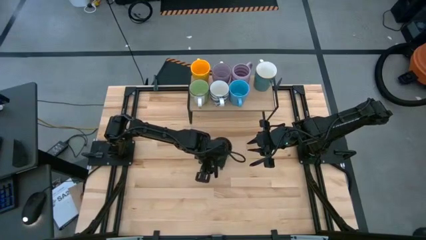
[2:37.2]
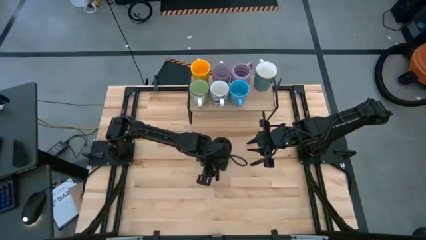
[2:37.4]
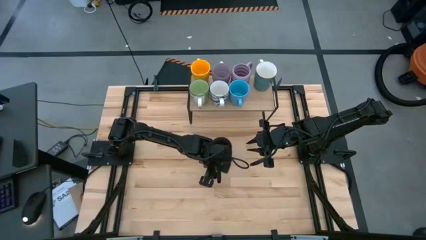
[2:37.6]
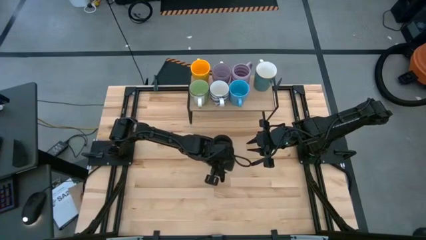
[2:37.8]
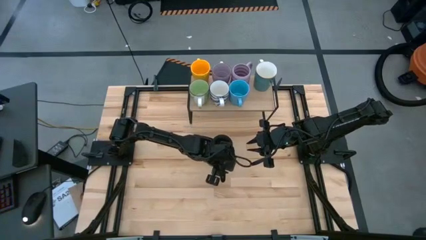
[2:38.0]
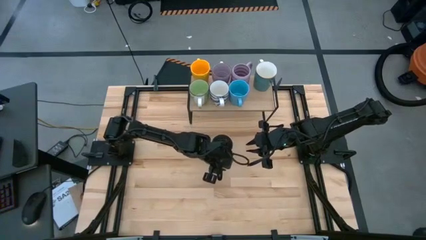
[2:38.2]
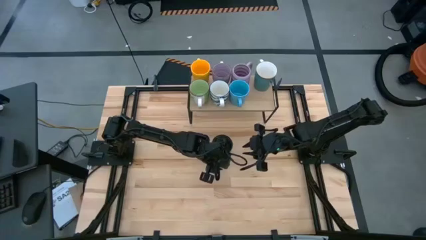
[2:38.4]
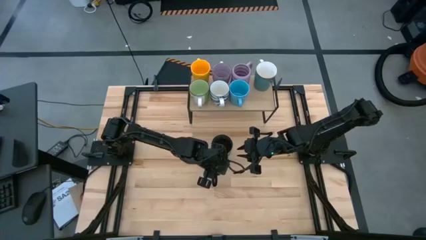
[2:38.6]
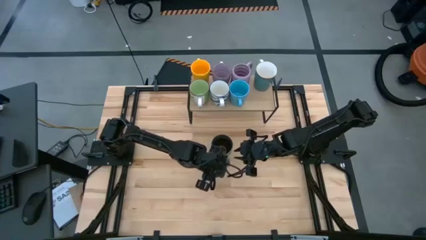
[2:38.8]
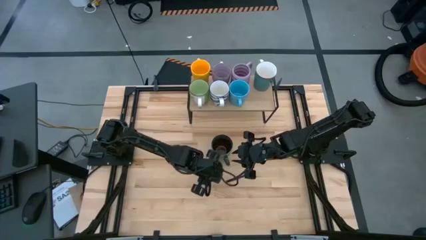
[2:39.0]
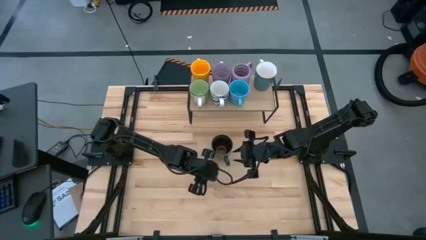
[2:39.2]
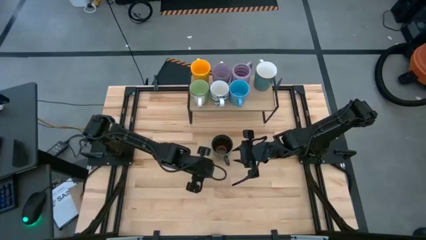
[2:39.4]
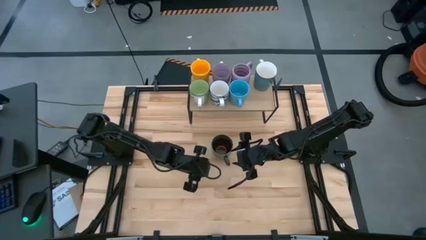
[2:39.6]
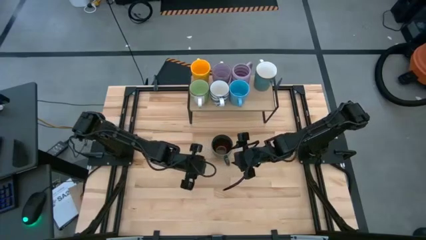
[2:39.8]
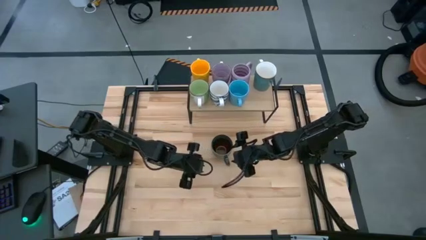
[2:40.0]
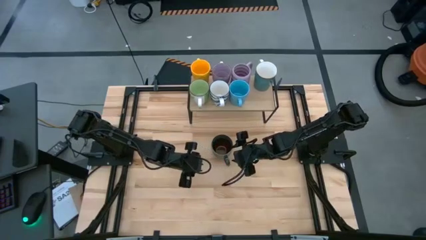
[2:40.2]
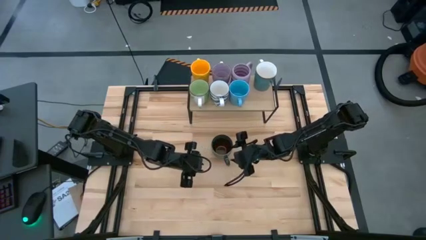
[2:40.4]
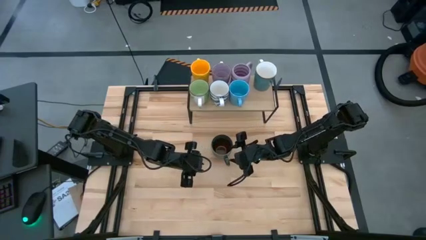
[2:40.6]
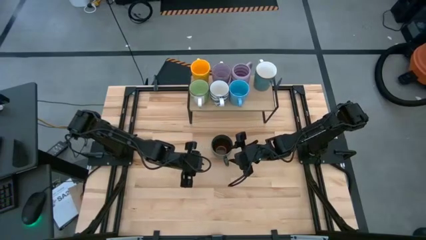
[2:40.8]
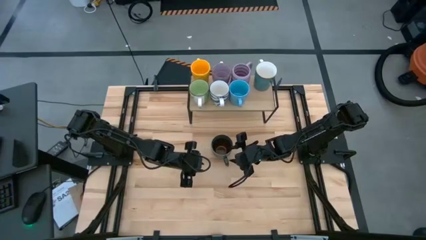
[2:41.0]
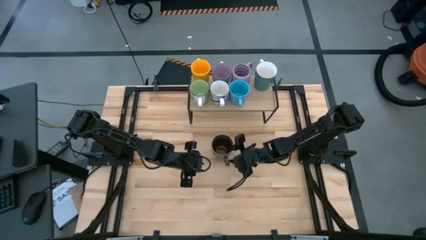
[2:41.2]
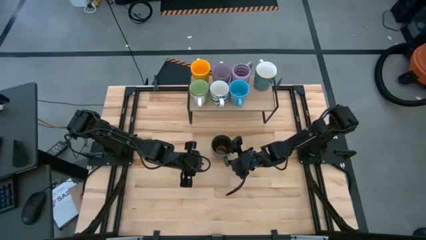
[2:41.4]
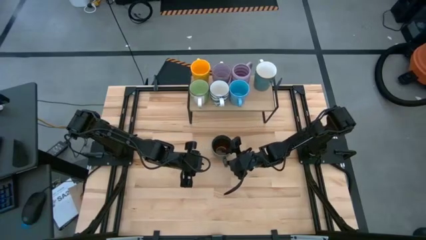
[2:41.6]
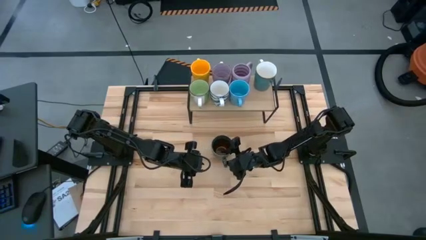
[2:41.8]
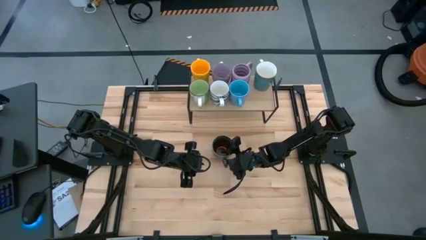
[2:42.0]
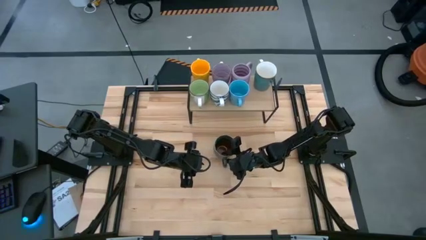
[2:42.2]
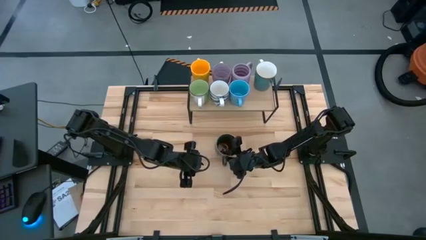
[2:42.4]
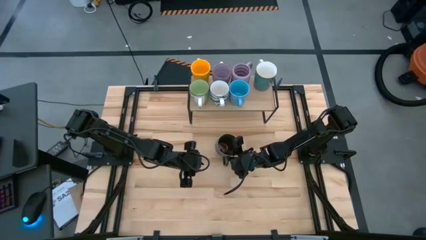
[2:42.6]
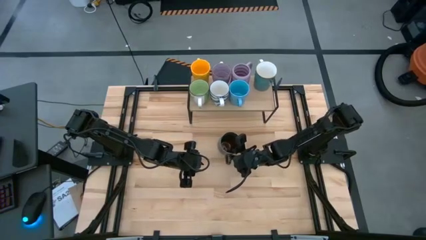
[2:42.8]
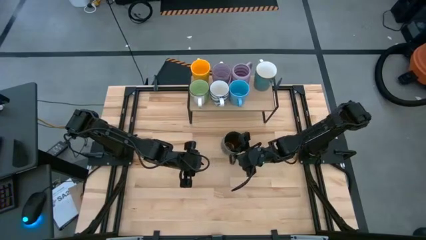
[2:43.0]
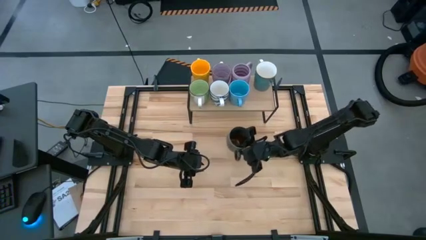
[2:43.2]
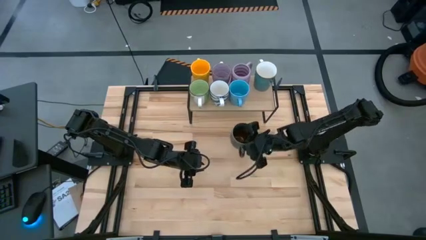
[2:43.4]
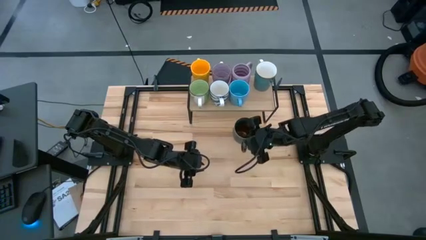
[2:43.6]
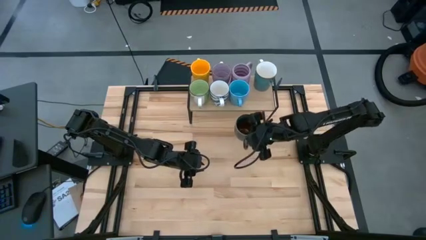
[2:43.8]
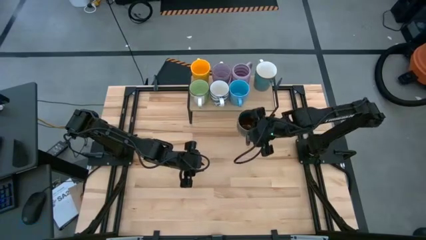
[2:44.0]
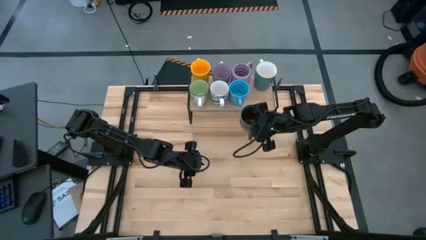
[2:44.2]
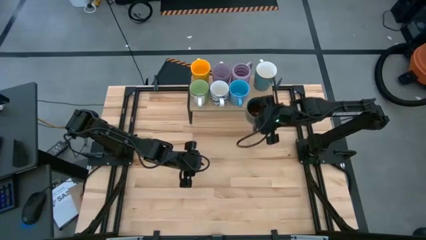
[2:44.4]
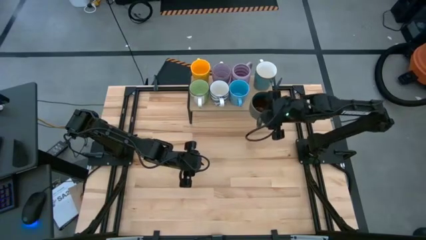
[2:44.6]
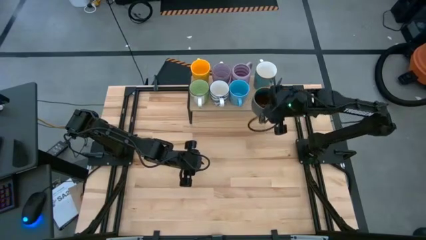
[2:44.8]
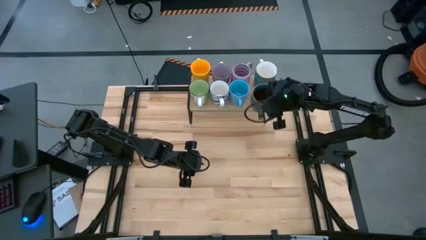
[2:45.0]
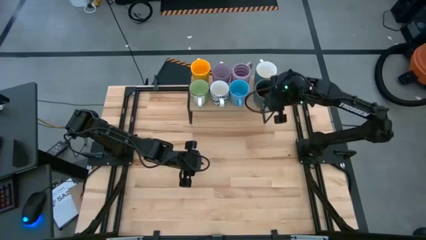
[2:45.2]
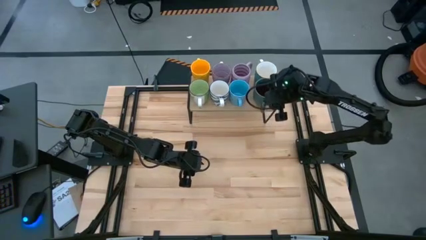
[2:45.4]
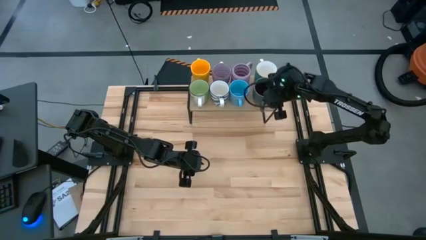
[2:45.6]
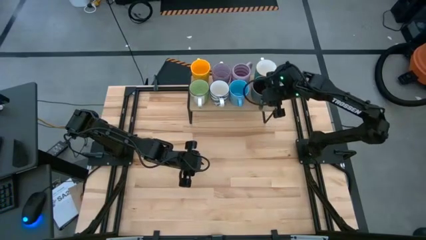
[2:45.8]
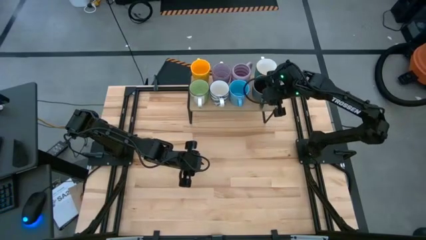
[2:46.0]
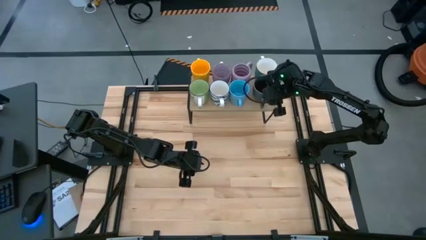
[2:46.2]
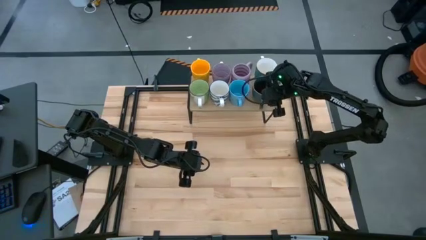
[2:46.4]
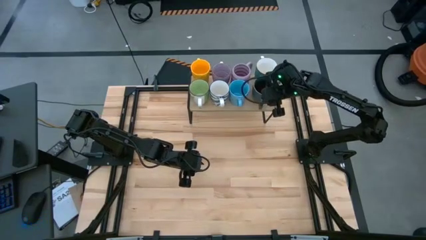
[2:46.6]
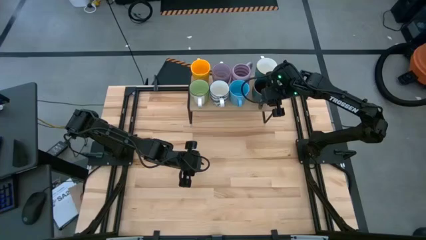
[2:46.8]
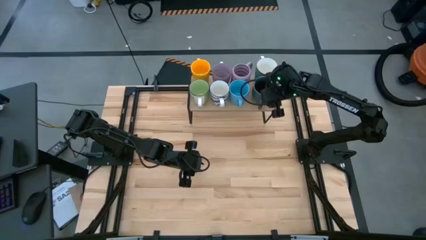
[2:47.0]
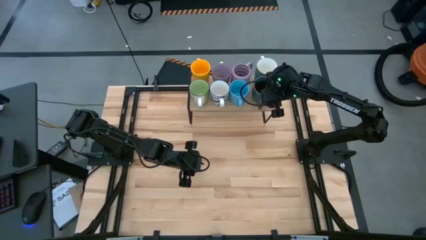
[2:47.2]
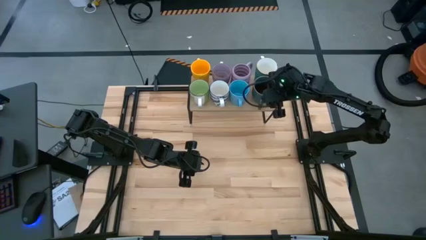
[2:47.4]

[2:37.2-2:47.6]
Task: Place coffee mugs
Put the brown mug on the shelf

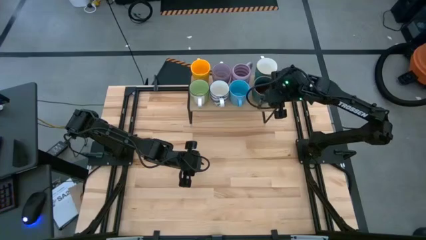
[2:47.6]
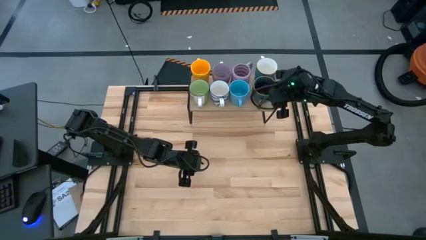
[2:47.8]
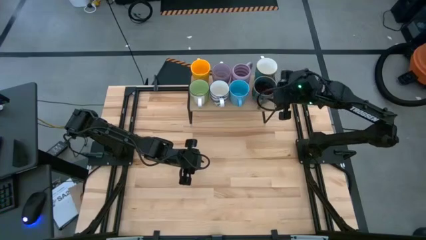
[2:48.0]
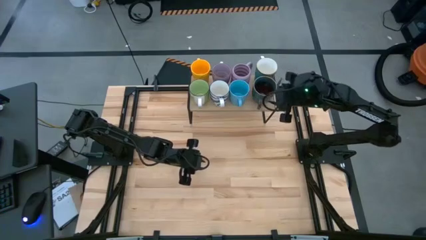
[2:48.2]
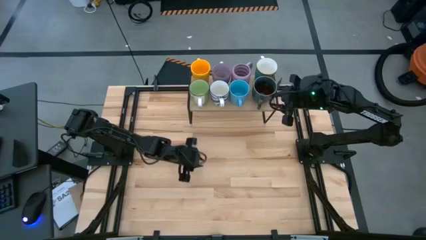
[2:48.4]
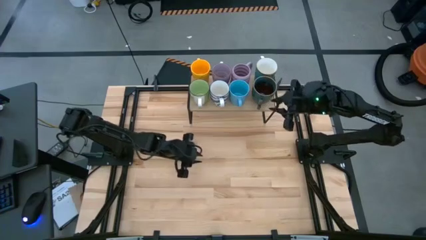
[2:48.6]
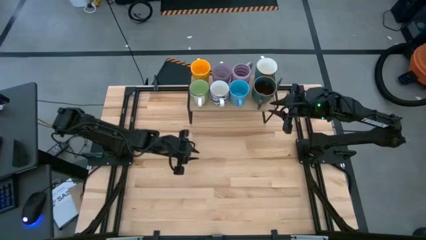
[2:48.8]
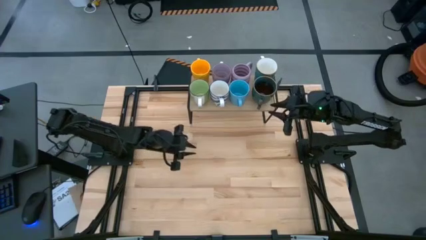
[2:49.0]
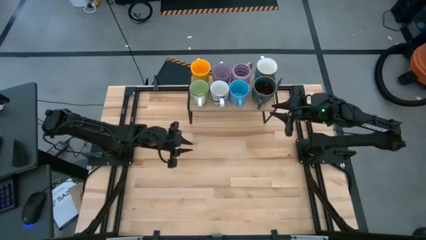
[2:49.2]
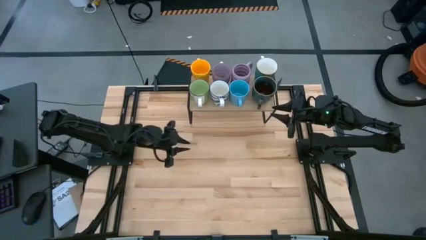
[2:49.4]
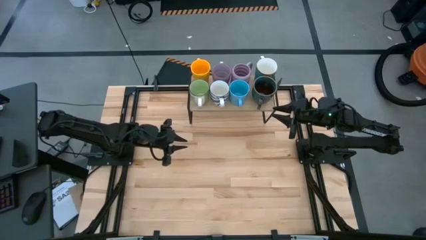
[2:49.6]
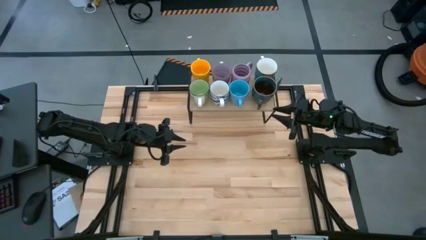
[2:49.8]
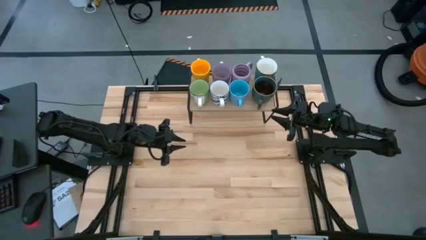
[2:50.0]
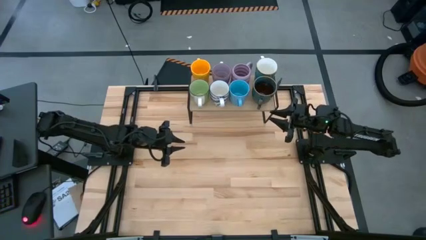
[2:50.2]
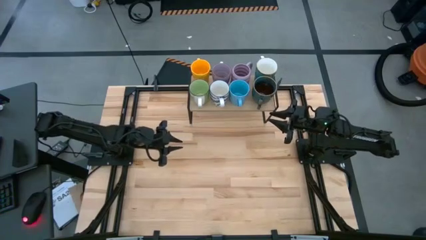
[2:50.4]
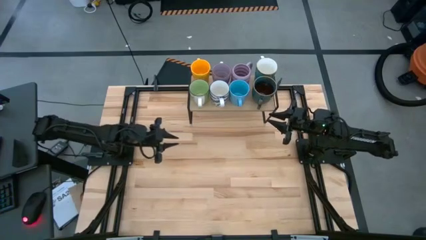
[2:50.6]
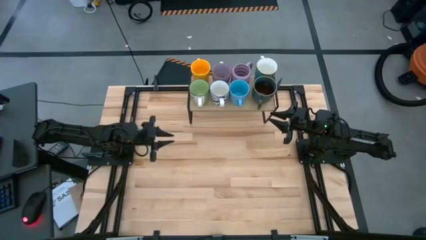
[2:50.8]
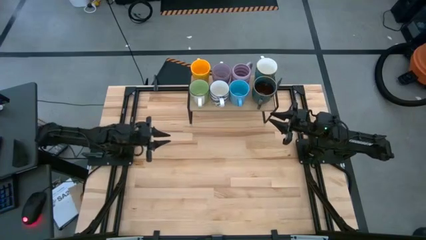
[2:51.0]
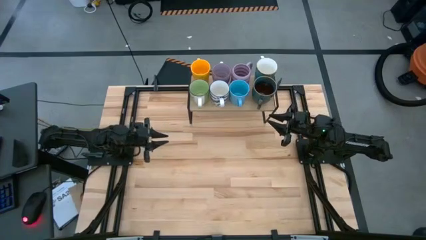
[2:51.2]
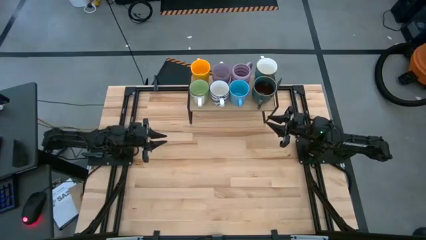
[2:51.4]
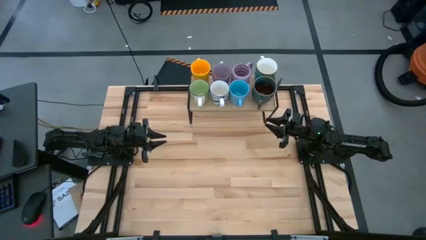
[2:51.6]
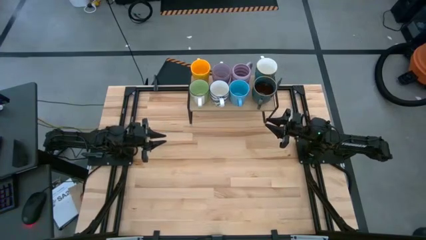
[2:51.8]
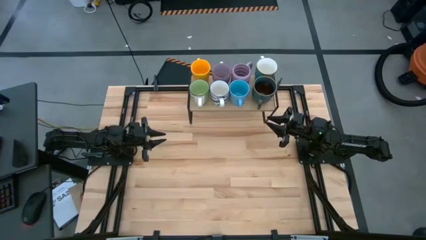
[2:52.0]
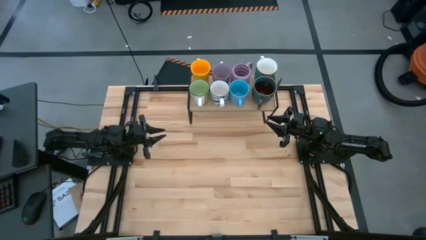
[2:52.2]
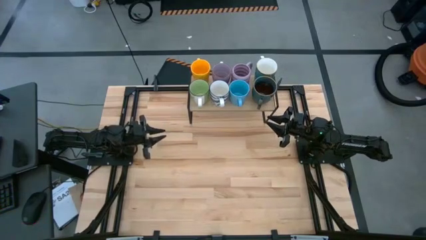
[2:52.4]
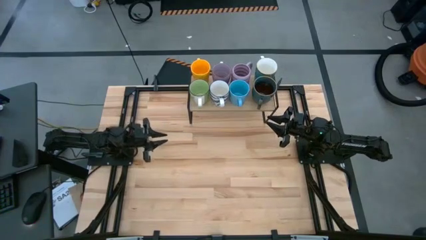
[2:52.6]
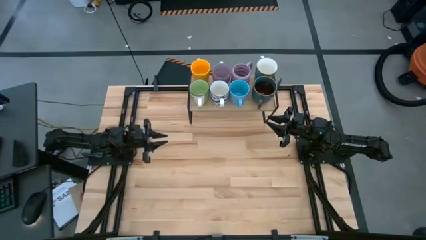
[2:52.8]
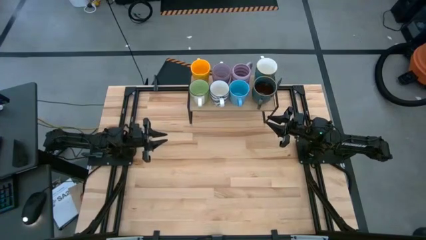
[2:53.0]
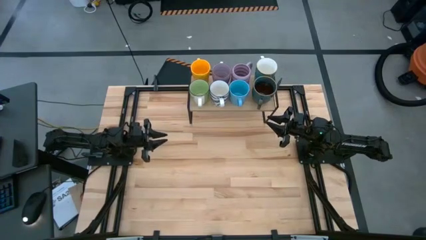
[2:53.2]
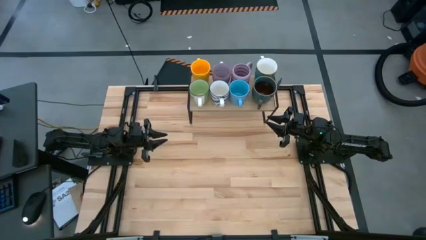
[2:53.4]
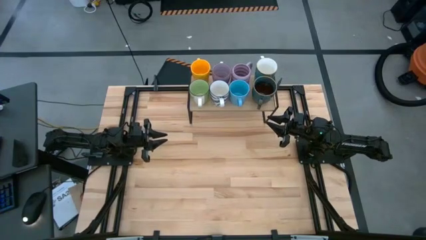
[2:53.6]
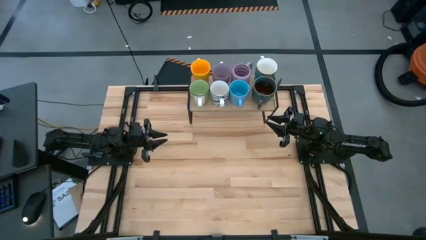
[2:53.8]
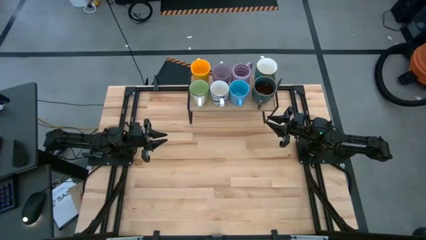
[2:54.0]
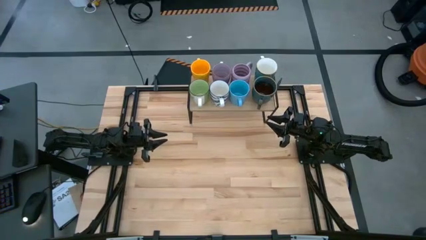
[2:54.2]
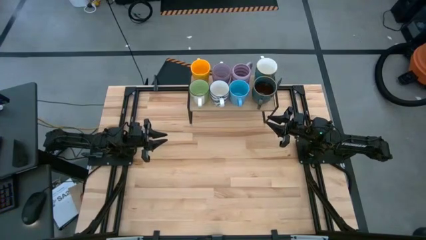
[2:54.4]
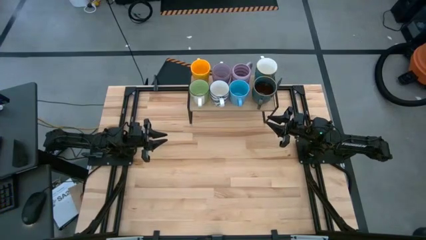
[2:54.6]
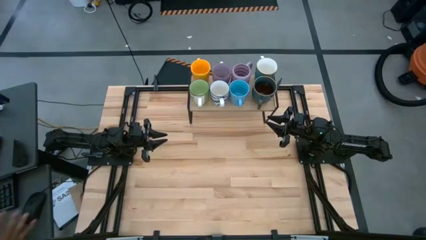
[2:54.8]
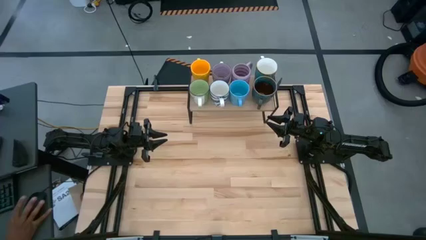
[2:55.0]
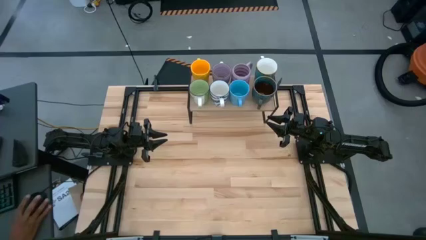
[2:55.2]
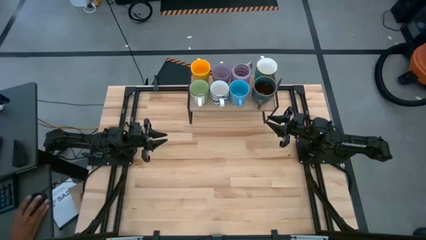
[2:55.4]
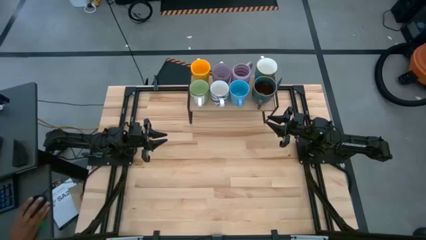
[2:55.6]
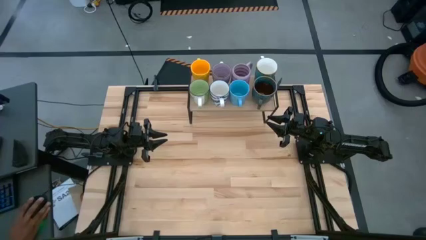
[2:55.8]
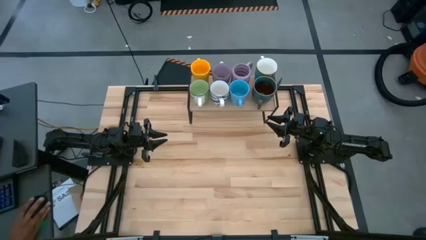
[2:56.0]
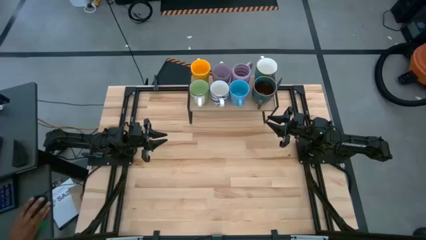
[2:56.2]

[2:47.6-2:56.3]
Return to Home Position
